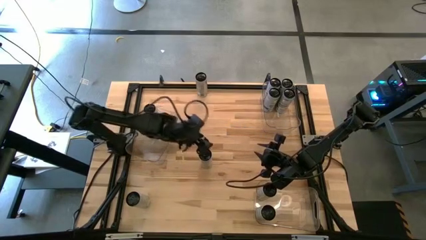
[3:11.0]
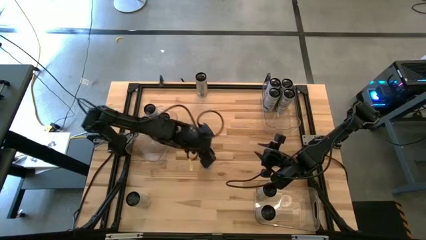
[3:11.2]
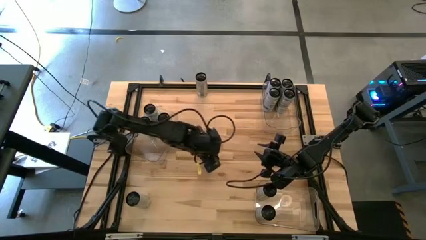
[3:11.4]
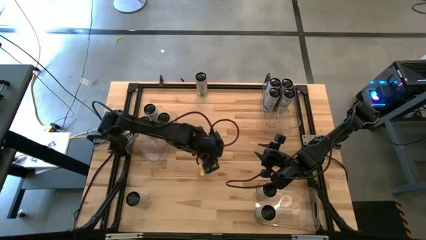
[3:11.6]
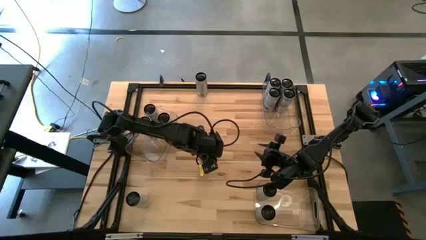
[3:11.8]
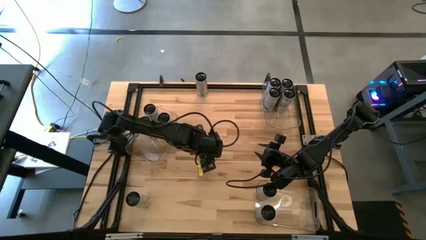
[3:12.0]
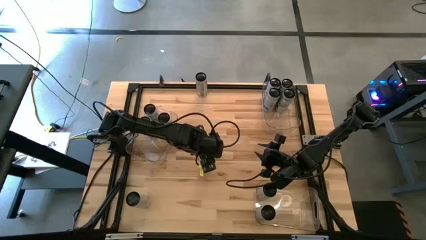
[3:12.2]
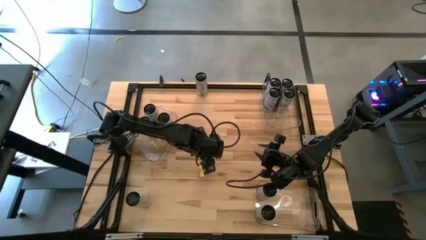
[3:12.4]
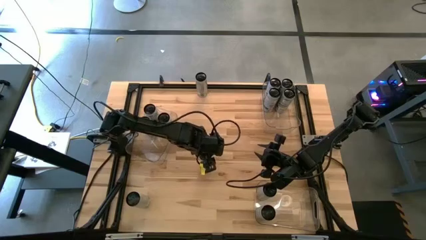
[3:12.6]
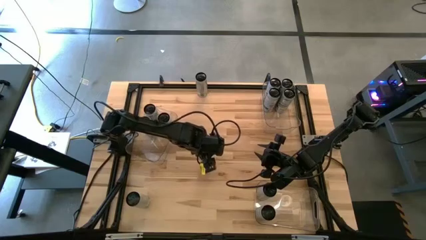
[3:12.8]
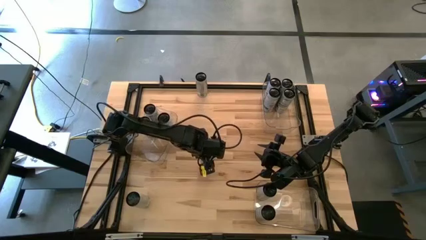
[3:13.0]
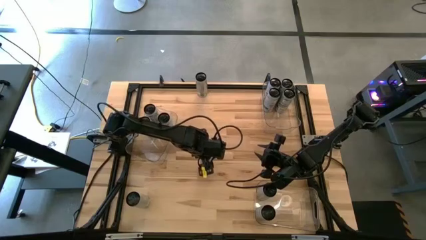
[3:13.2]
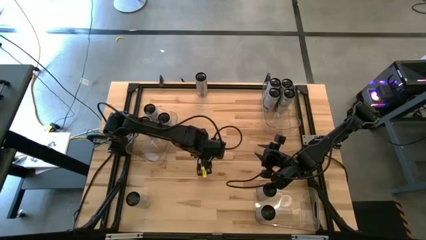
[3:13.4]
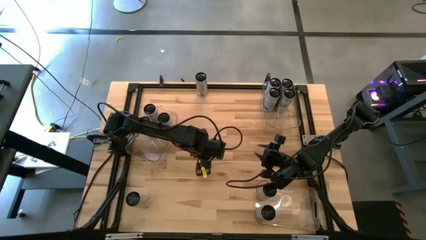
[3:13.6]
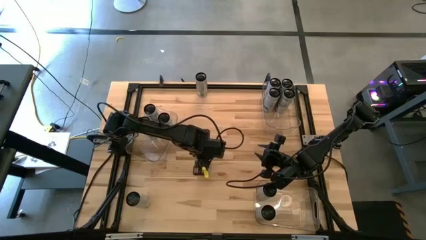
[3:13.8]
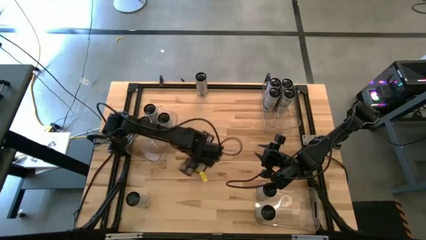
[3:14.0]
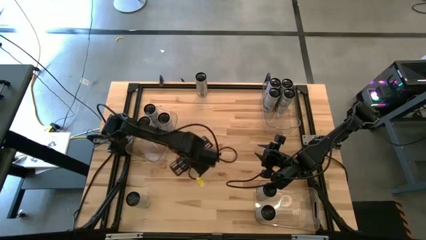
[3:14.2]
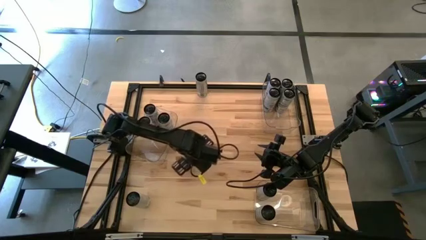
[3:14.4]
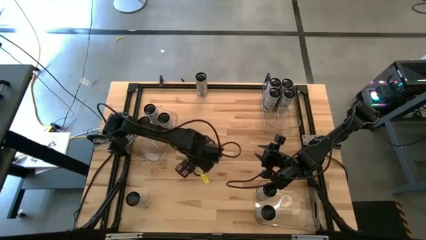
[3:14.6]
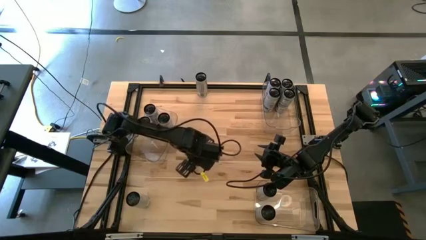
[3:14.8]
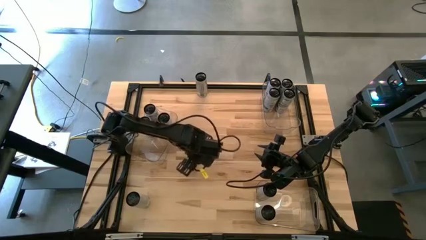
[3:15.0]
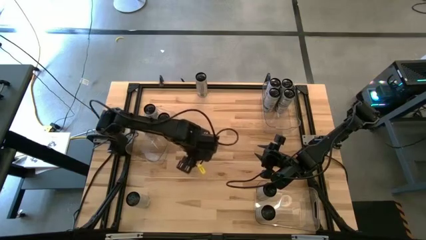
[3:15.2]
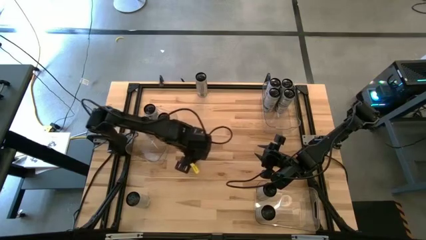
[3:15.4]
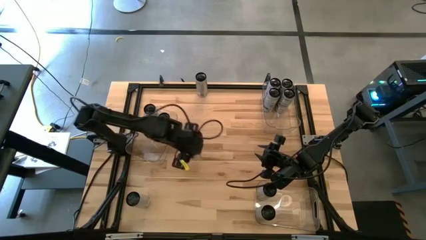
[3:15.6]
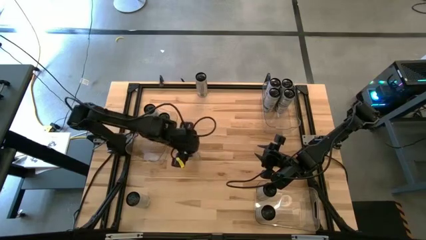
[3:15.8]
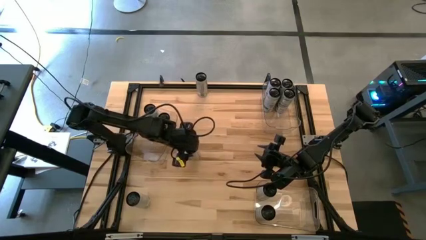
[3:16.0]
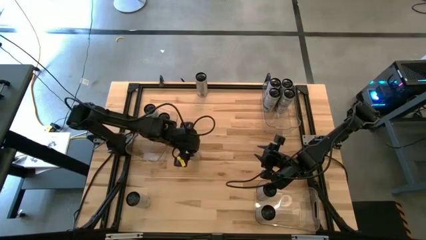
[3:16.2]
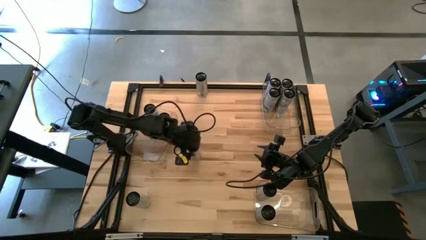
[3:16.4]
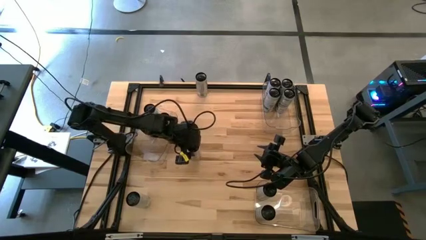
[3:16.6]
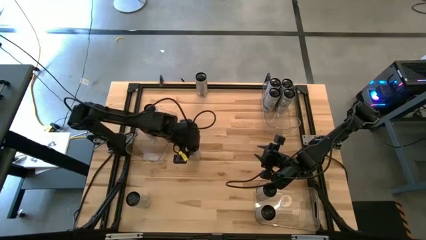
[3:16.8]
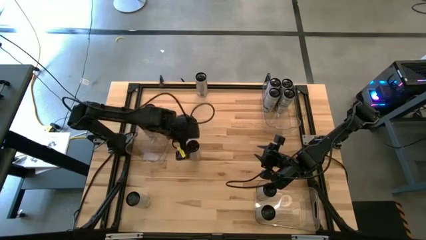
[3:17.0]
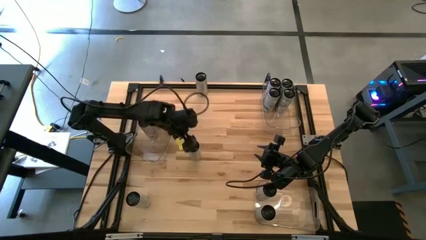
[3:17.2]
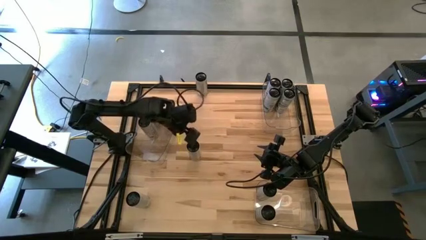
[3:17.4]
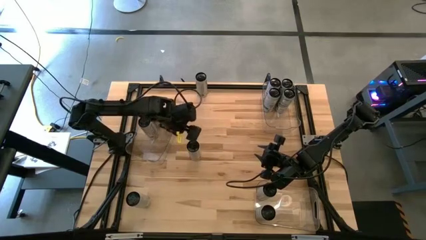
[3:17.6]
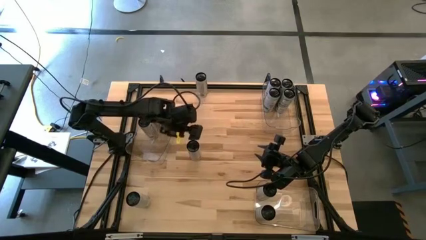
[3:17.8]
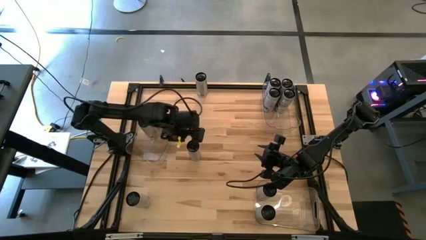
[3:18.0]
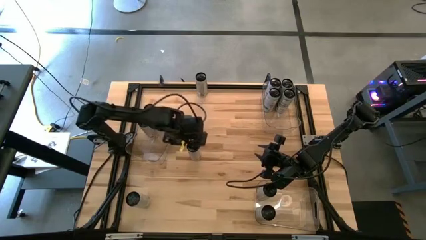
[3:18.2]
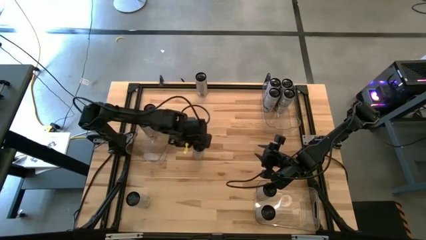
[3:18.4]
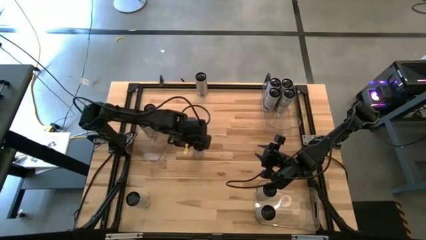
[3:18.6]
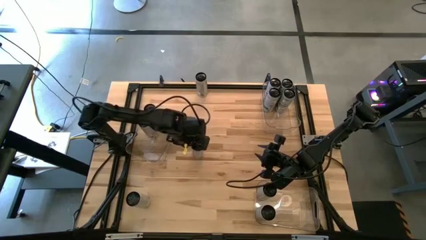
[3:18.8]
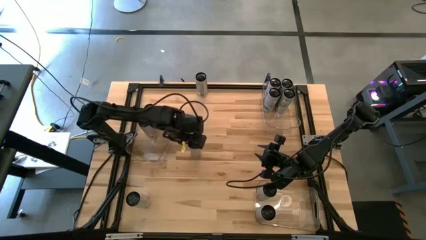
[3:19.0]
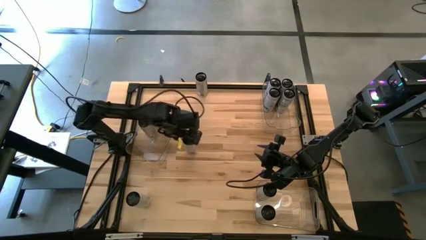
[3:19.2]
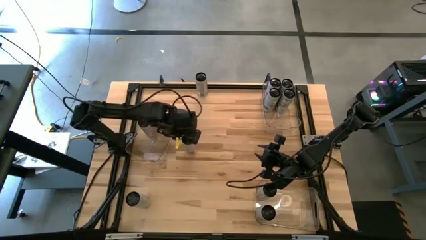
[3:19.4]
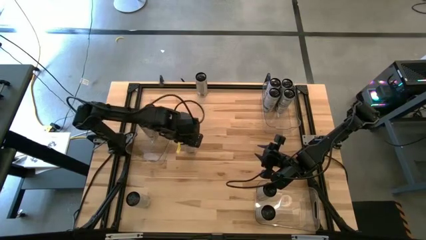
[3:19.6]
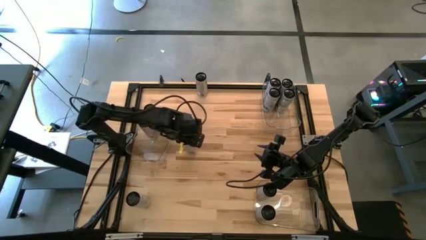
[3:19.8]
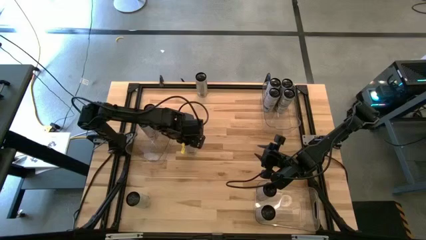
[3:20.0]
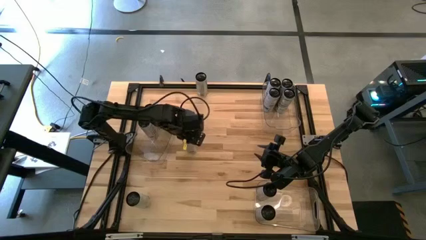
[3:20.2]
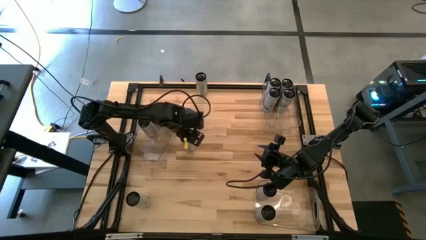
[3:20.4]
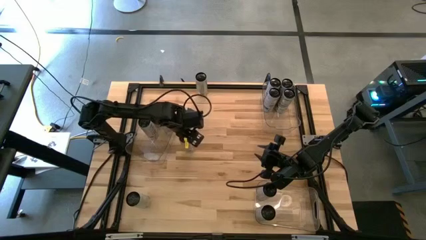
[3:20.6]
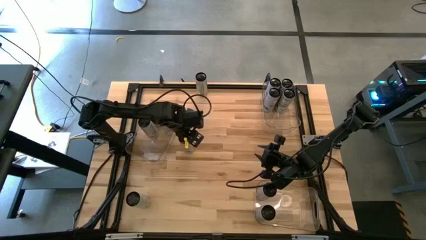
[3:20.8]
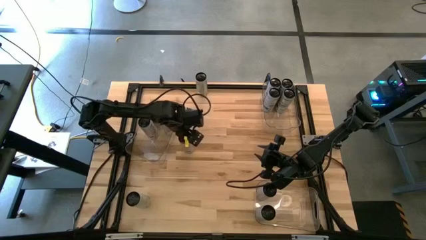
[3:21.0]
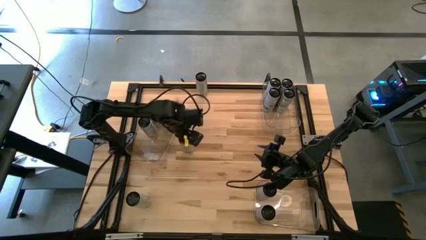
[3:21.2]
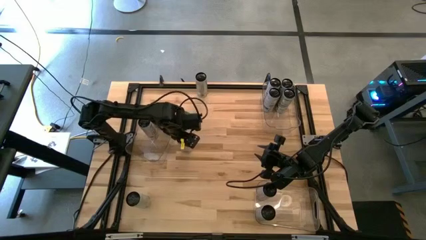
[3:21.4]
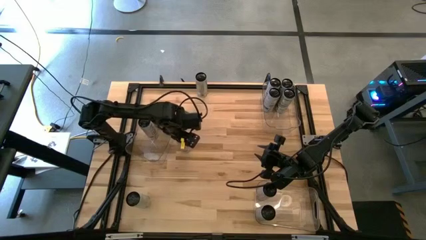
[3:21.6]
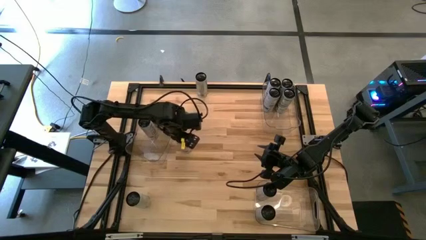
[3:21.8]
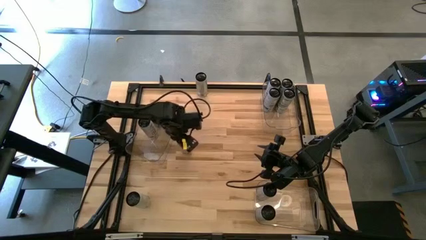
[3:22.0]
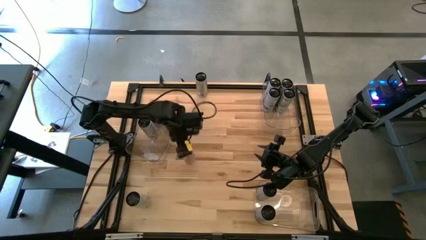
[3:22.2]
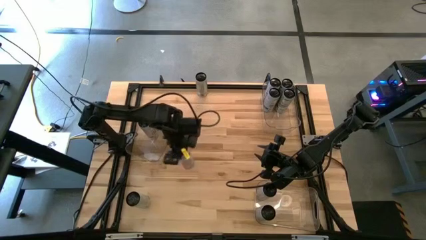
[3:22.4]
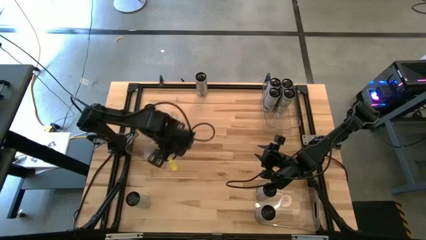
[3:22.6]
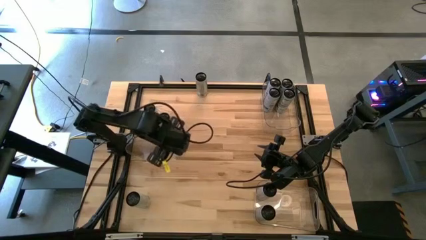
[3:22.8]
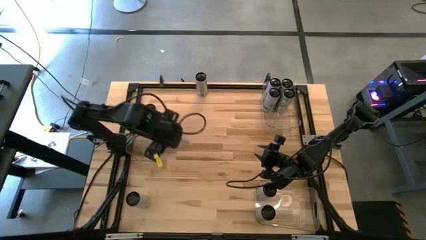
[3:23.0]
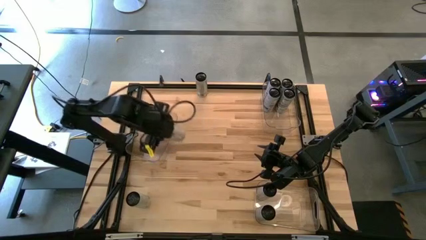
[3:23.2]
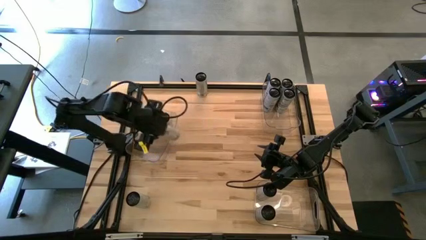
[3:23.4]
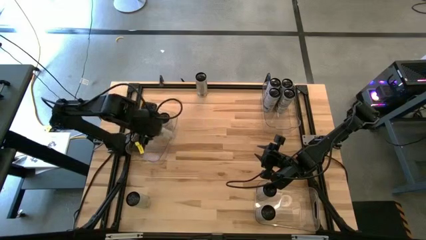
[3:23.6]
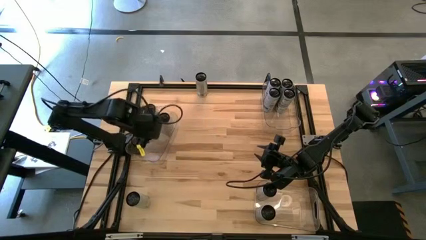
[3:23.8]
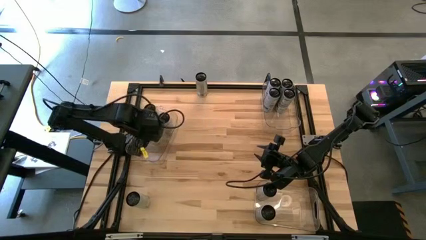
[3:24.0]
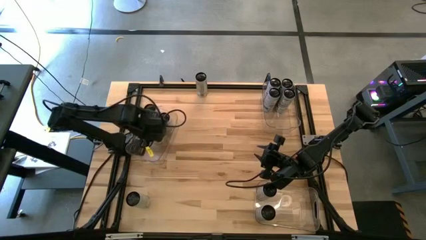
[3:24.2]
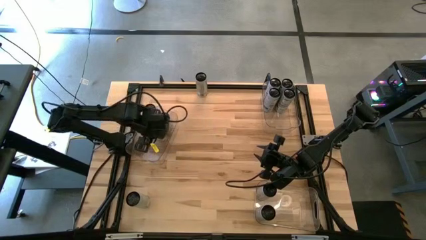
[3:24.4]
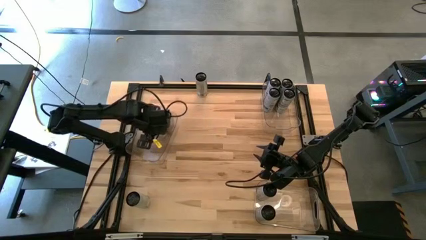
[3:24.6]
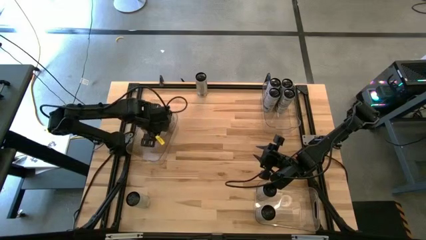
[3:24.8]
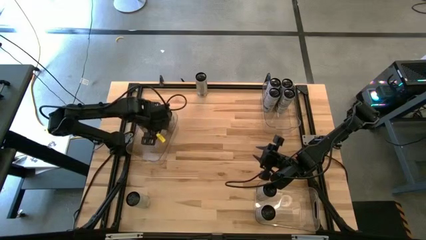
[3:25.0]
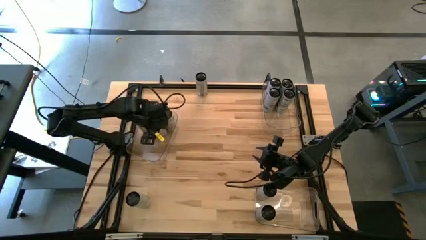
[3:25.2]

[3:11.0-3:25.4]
Task: Sort soda cans
Put the white-pink soda can into the middle transparent bin
